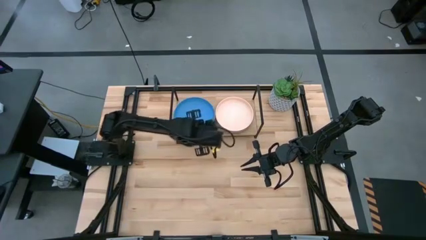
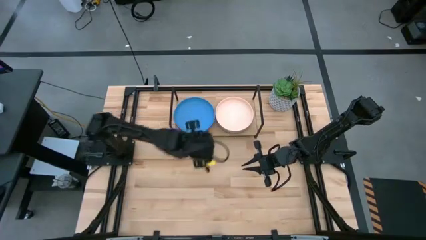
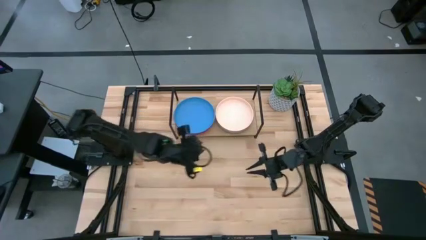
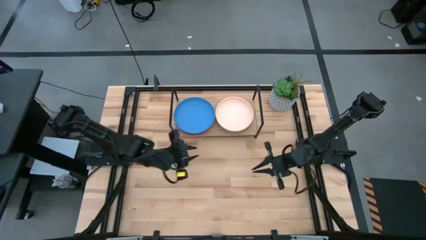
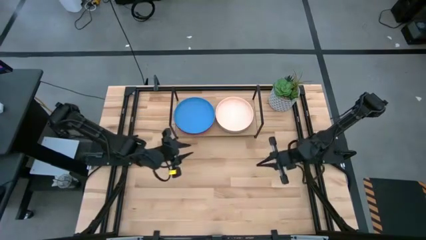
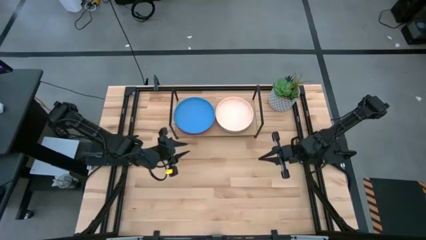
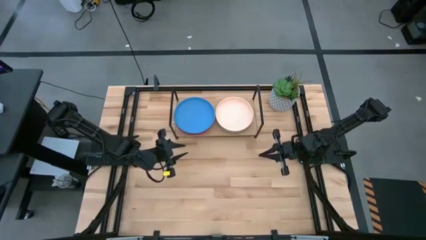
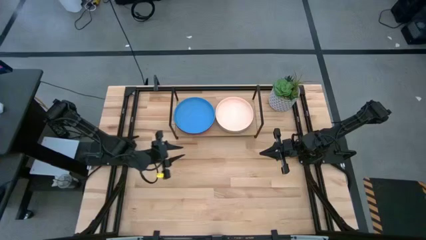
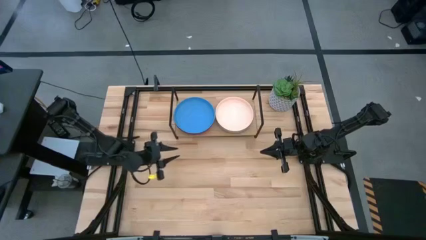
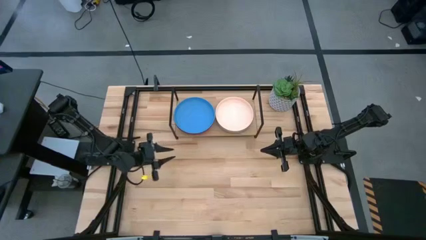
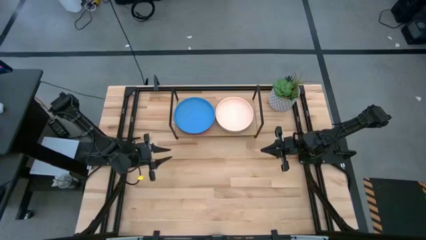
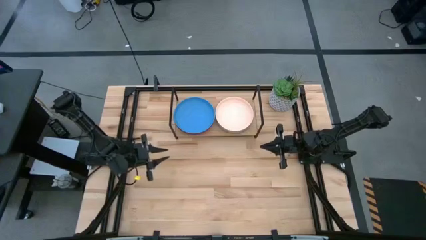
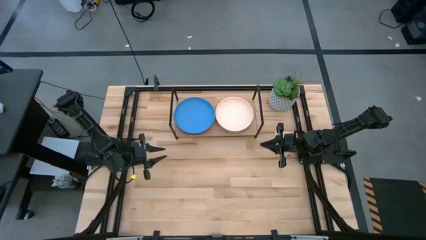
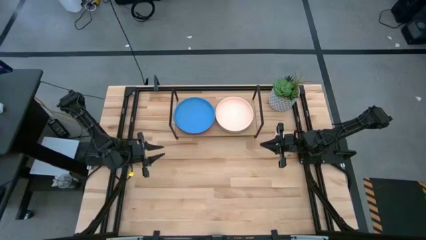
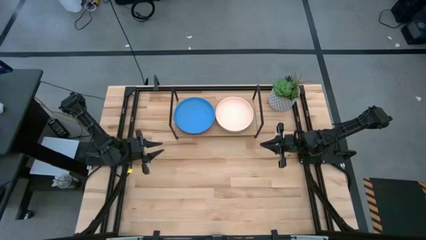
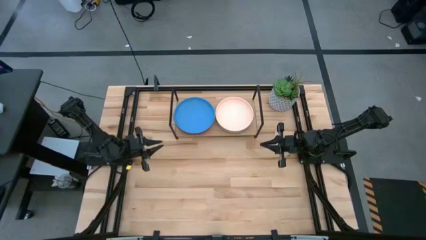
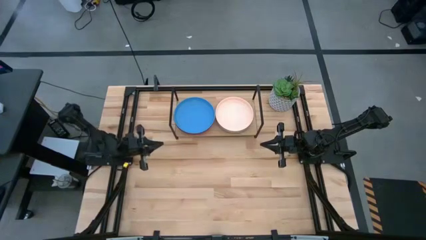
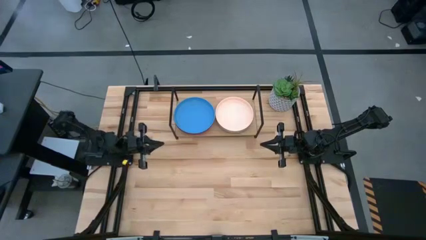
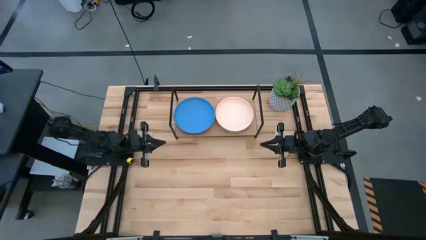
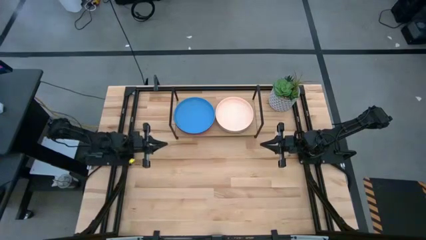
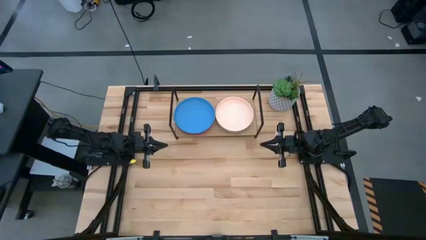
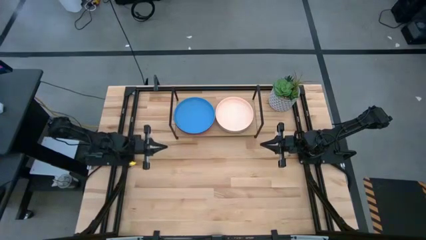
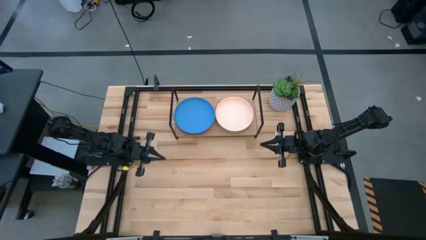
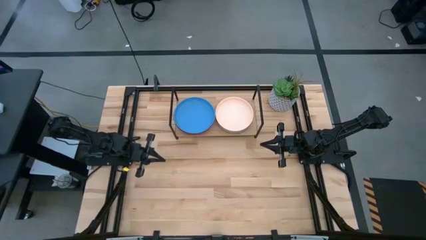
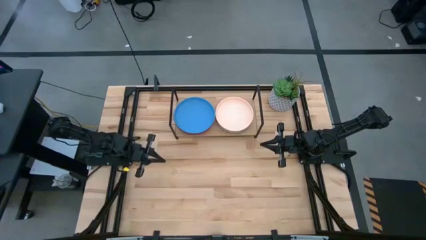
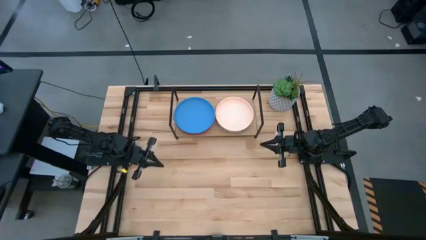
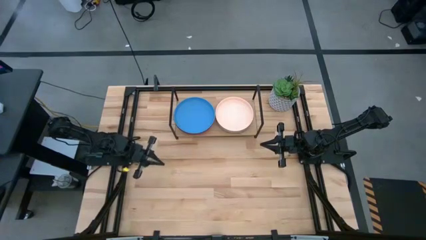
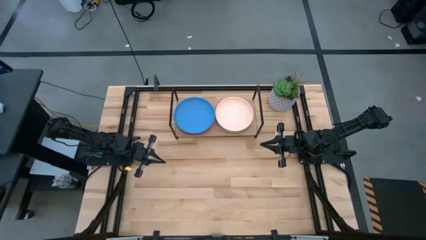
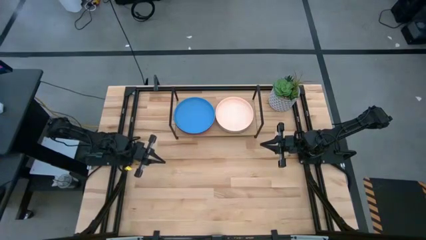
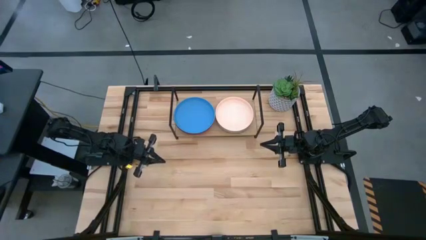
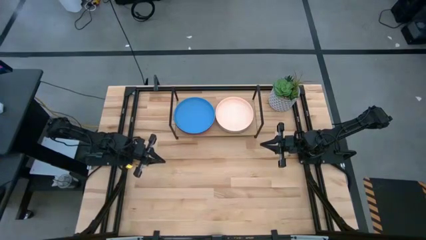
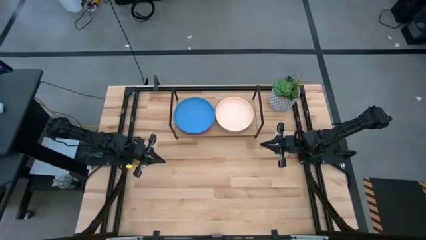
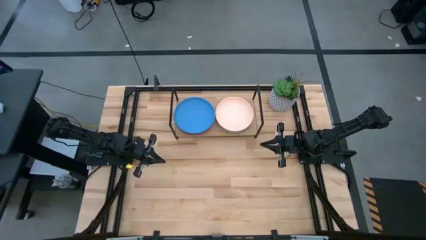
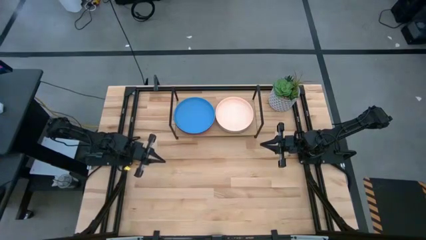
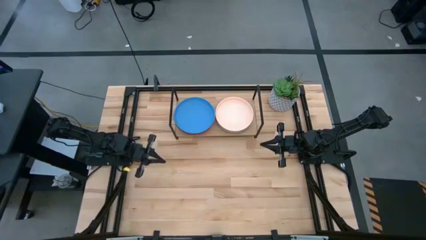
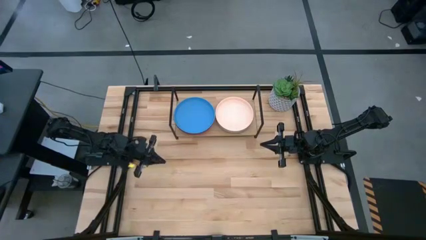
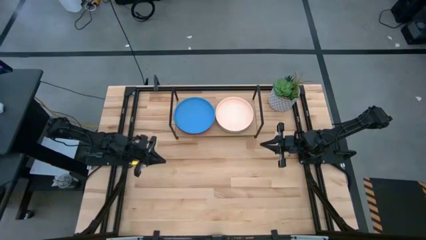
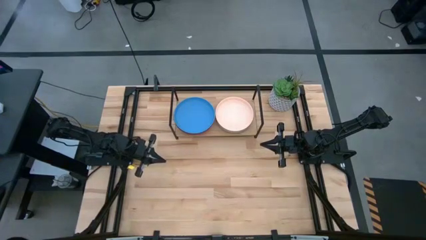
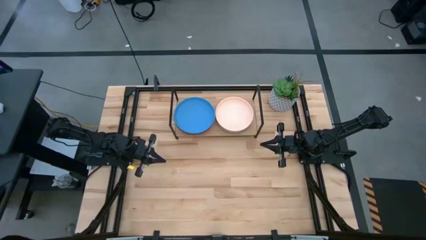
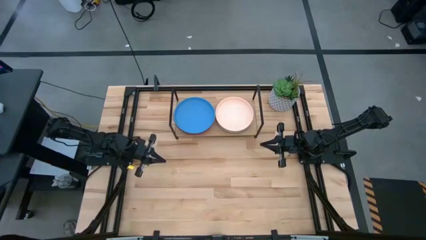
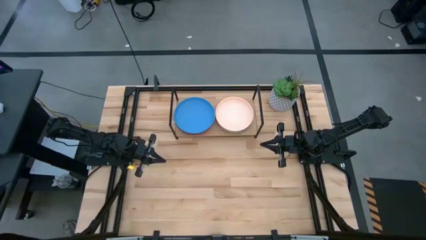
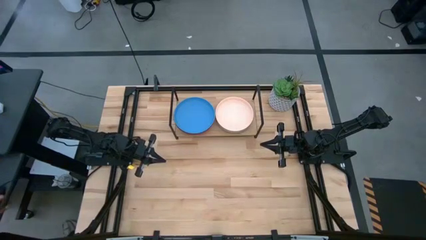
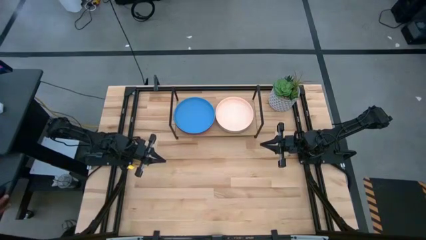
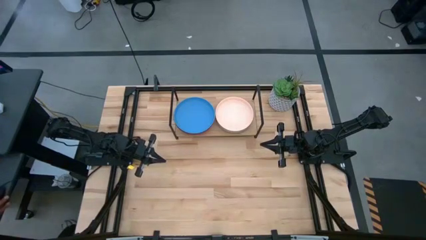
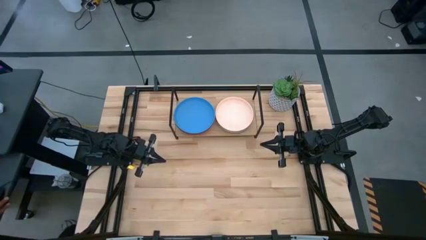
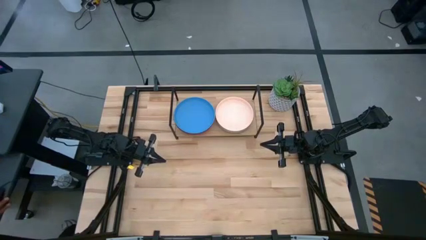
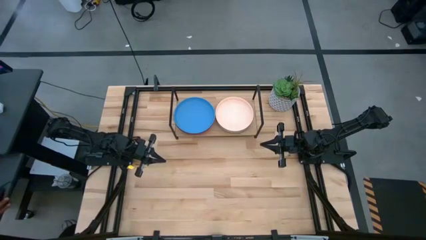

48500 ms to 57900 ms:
Task: Place and stack plates onto a shelf
Return to Home Position

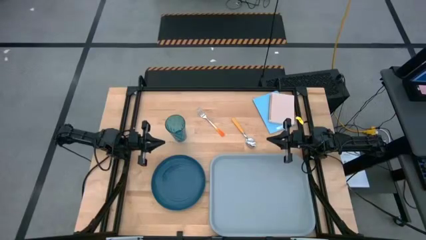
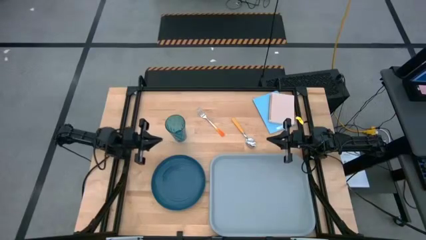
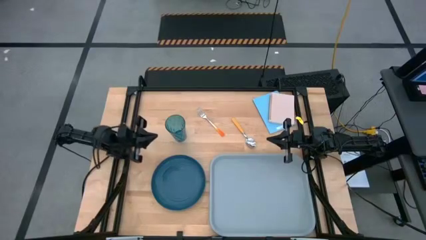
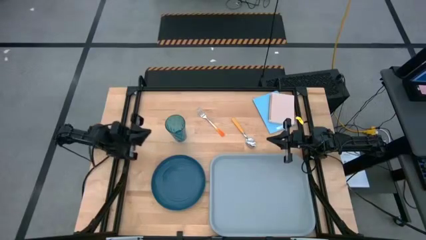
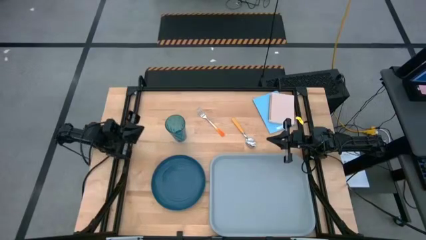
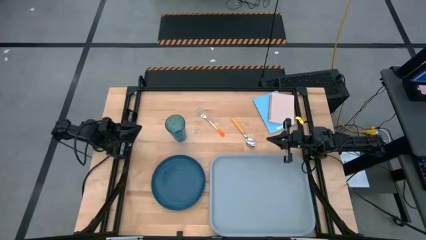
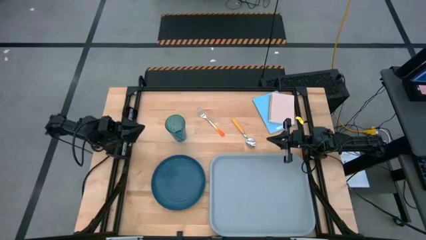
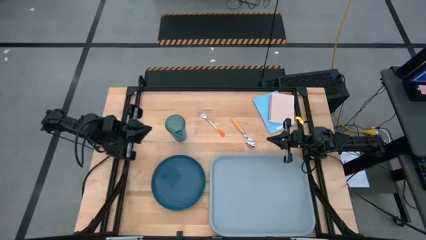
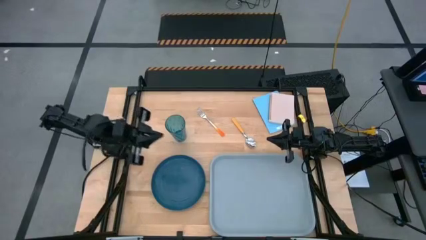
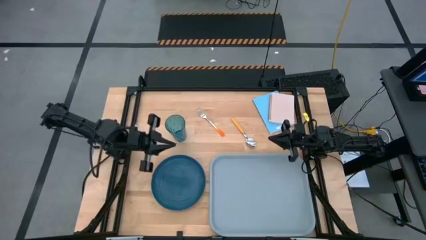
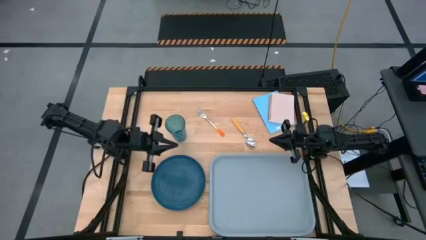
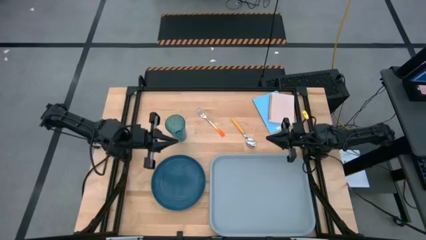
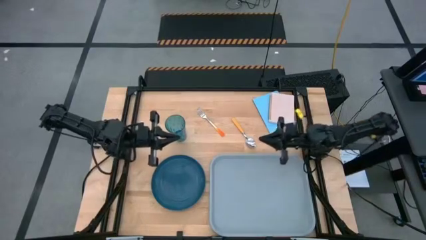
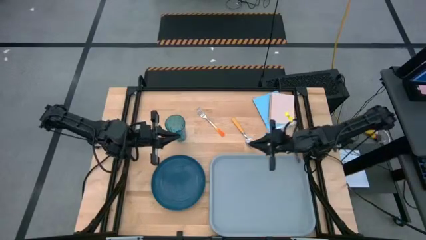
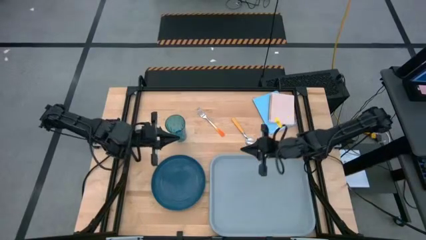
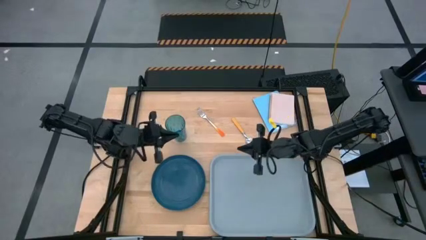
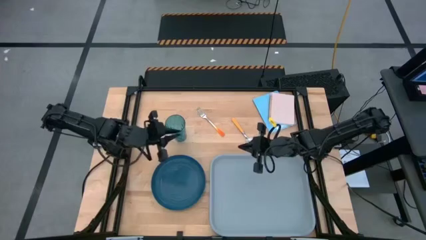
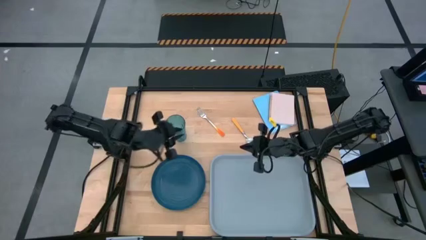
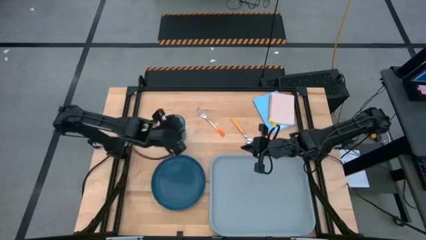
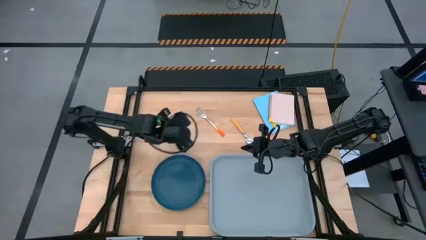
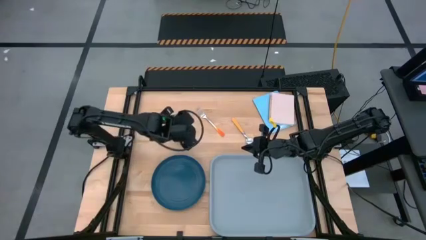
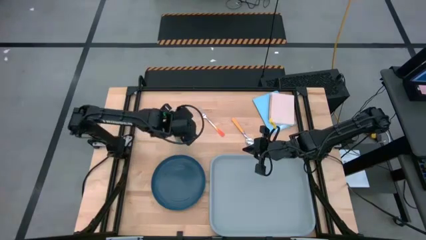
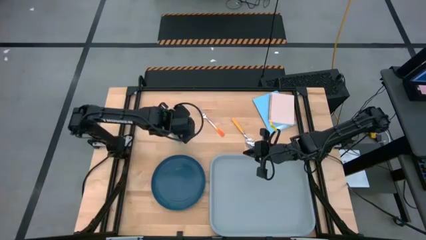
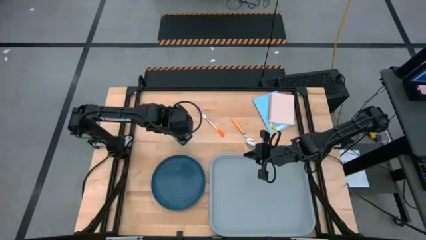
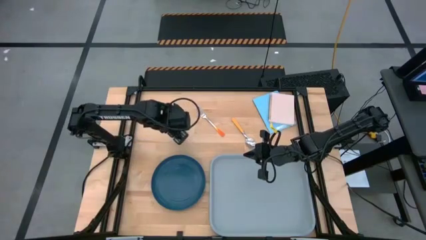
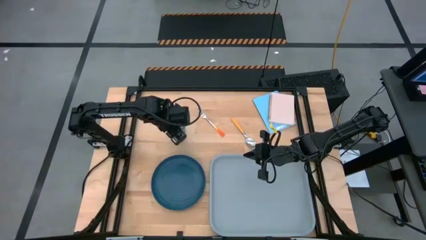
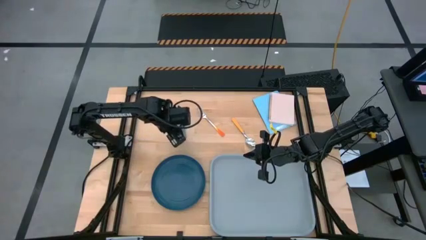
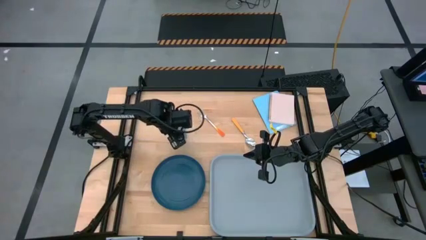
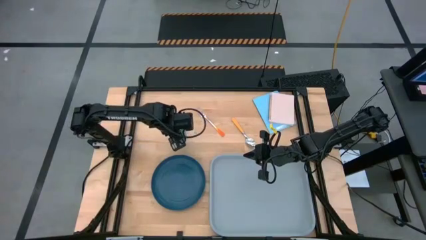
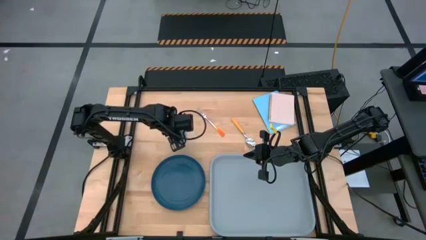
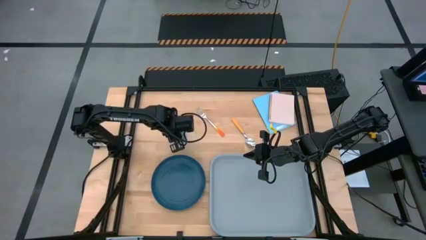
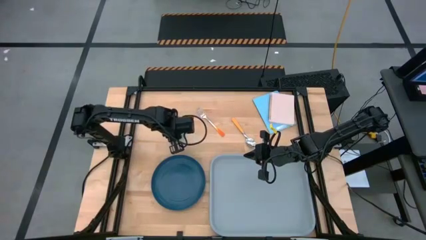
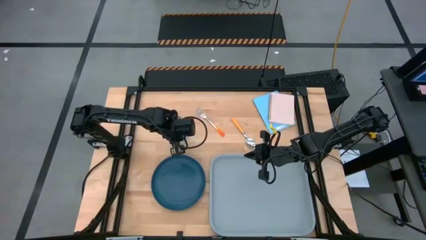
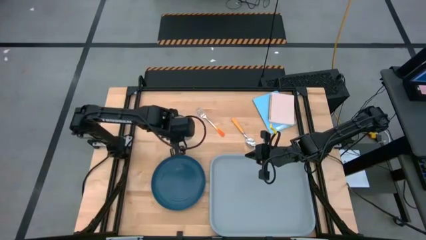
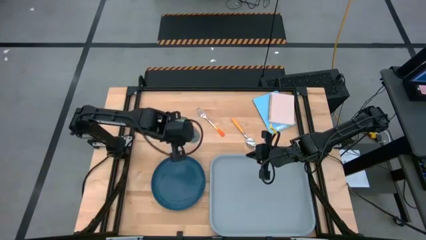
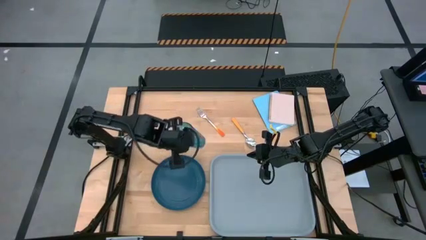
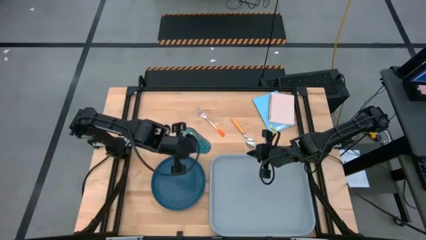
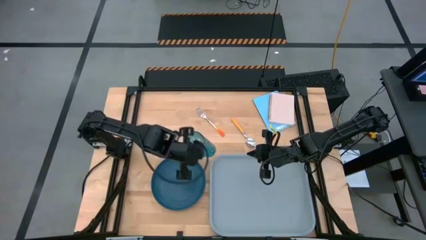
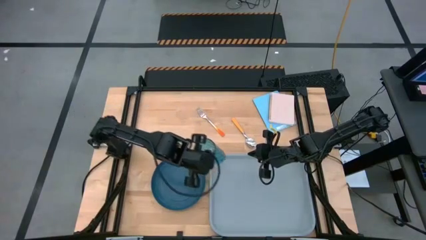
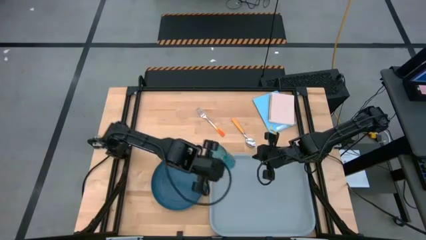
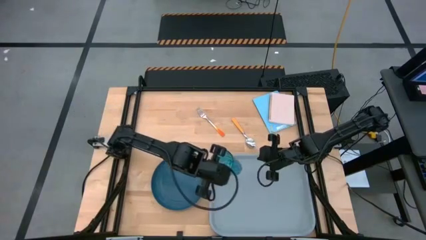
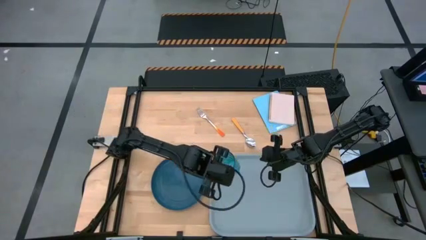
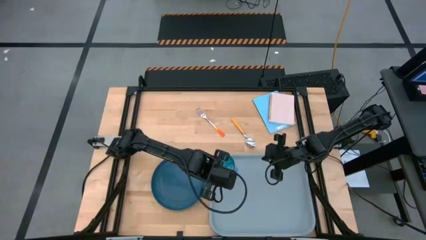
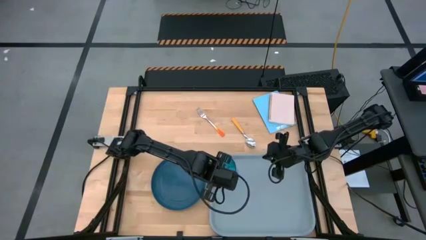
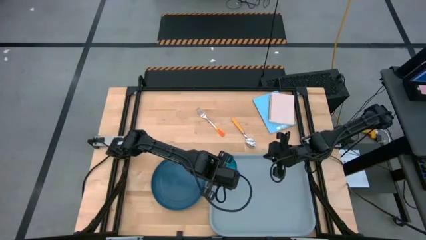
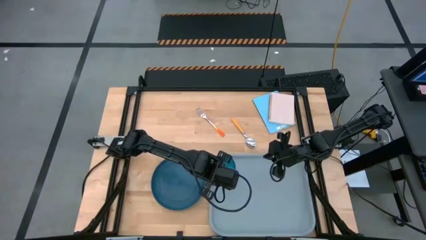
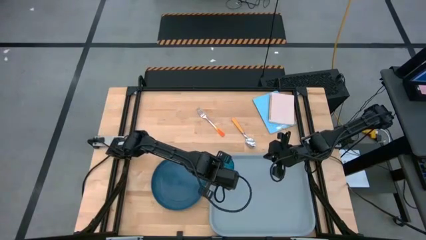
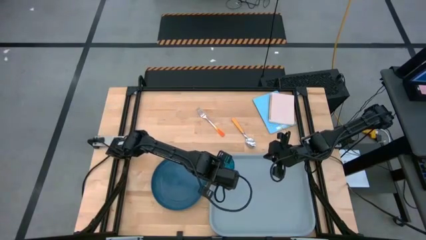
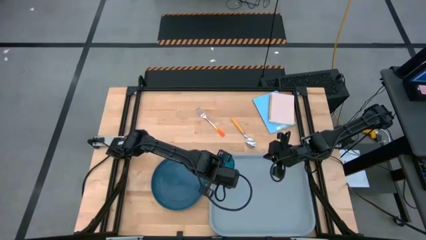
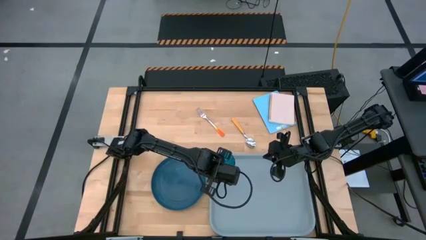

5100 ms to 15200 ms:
Task: Pick and place plate/cup/fork/spoon on tray
Put the blue cup to the top left of the gray tray
